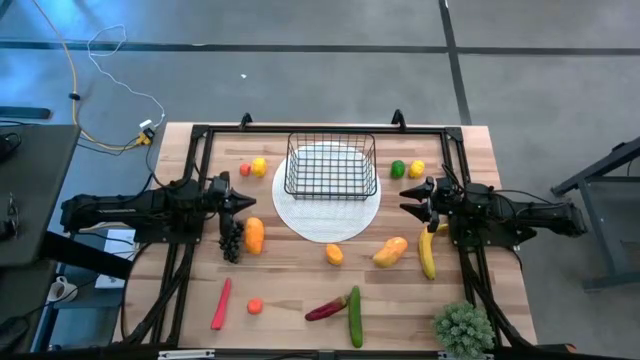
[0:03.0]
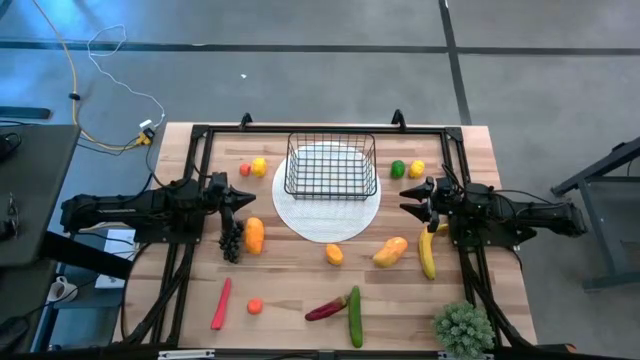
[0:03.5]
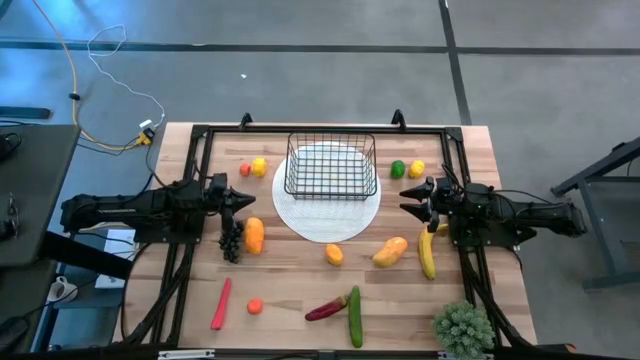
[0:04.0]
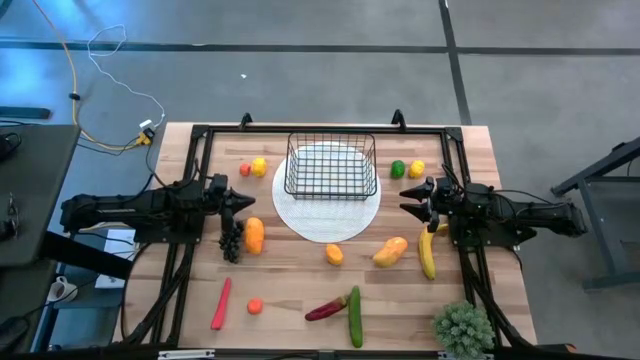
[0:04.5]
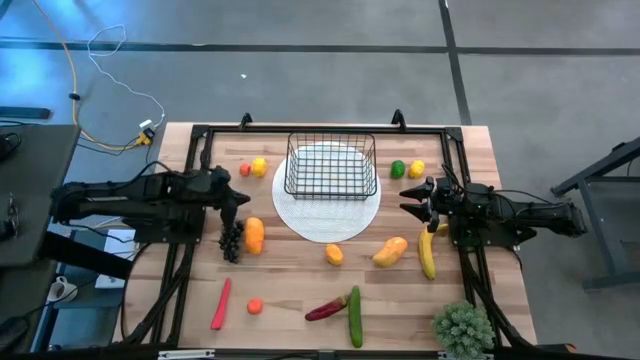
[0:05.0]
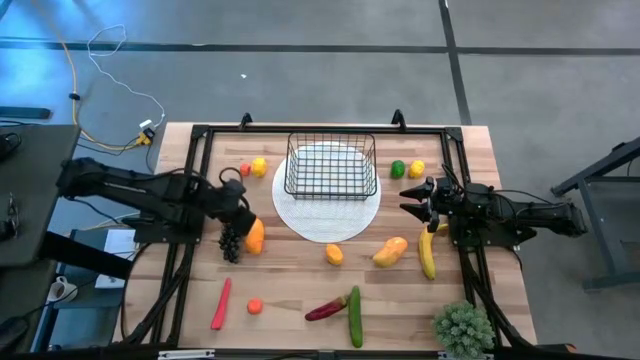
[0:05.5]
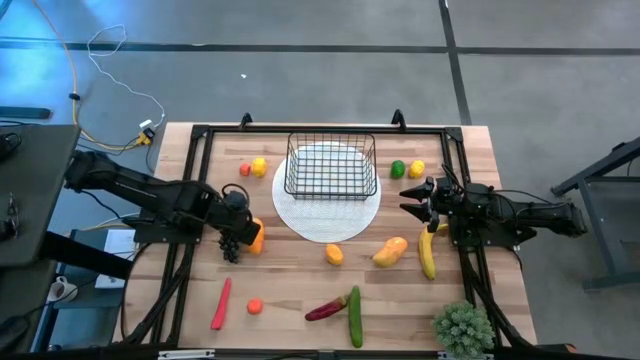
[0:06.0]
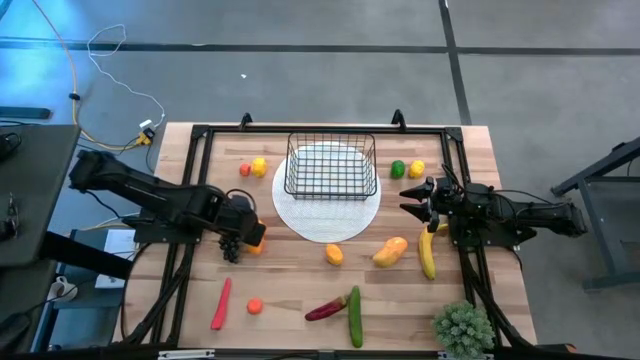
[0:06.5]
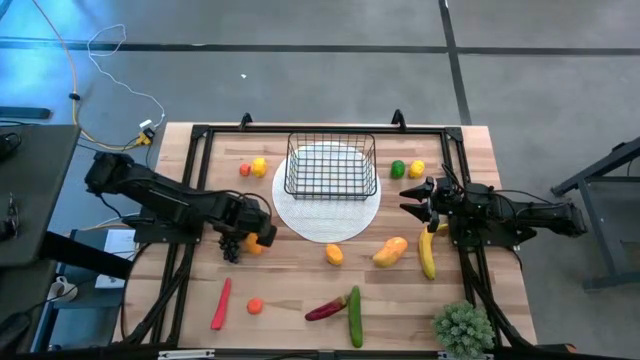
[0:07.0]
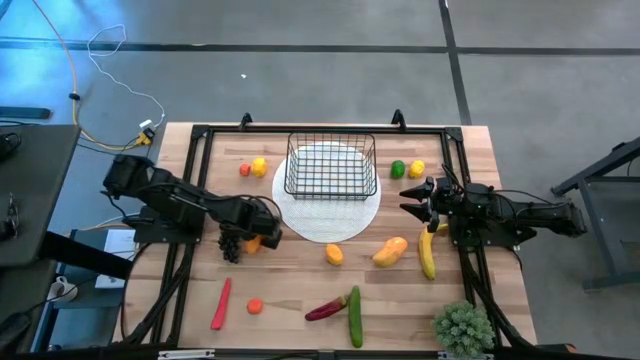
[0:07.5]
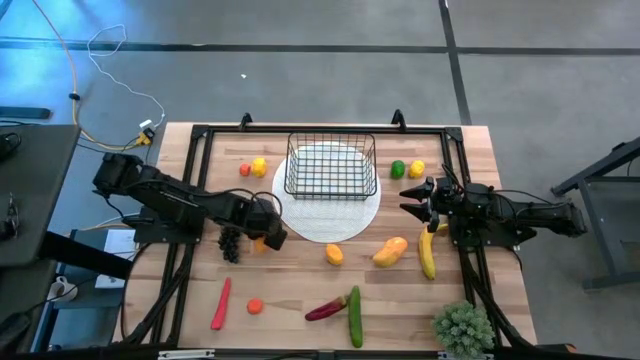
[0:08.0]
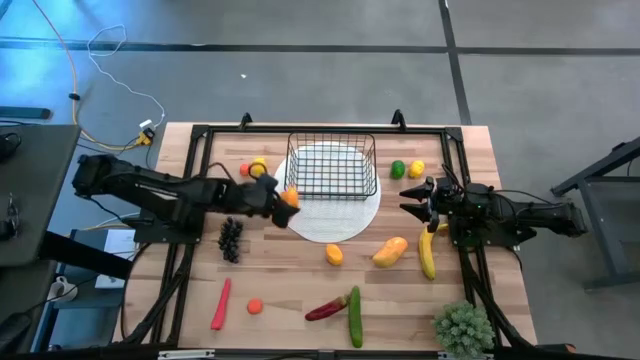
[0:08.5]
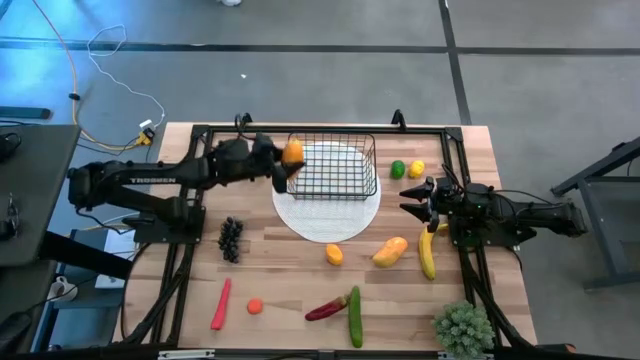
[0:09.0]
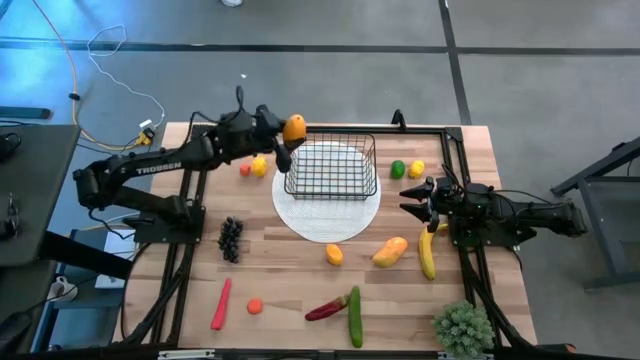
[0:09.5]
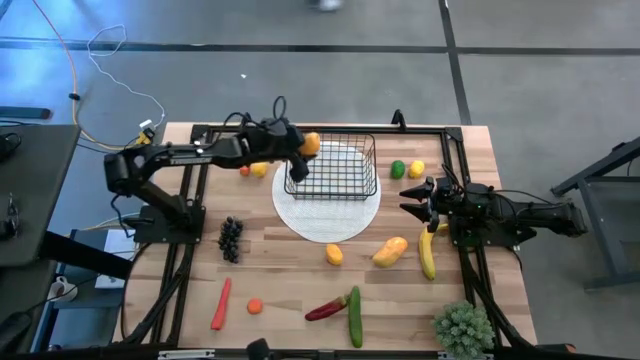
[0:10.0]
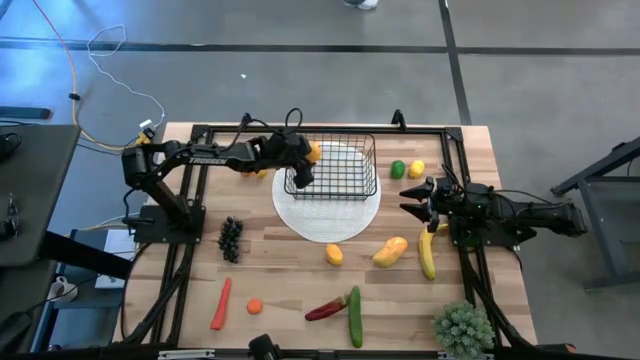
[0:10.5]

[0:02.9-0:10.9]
Task: Build produce basket
Put the left yellow mango into the black wire basket

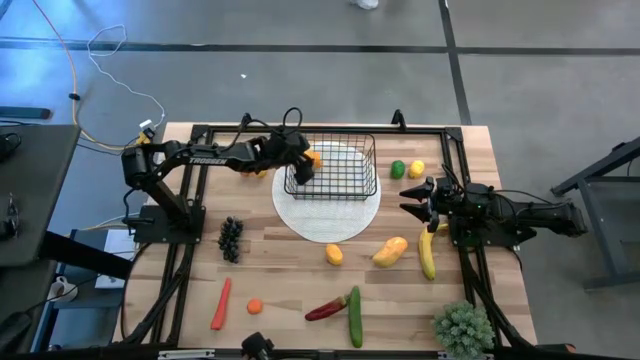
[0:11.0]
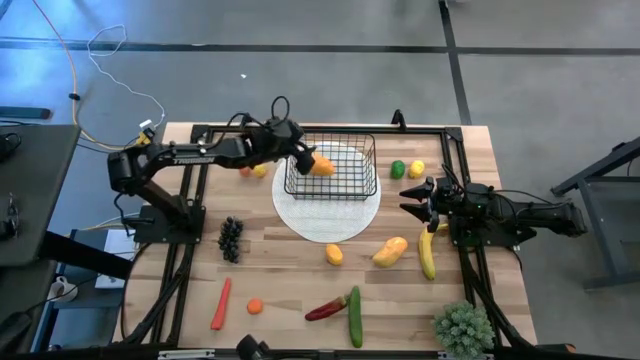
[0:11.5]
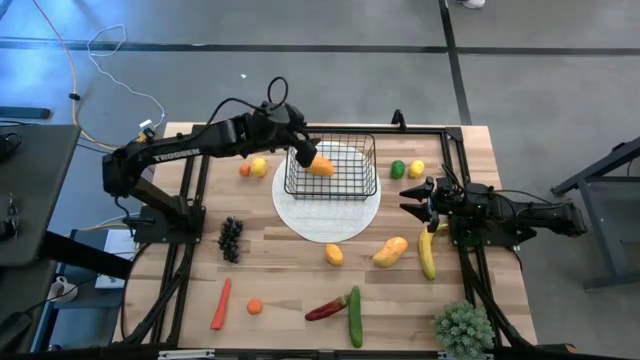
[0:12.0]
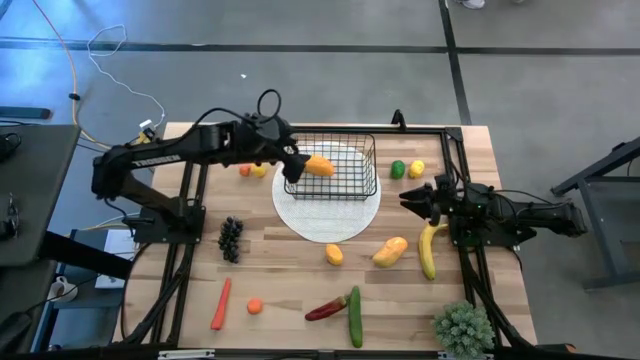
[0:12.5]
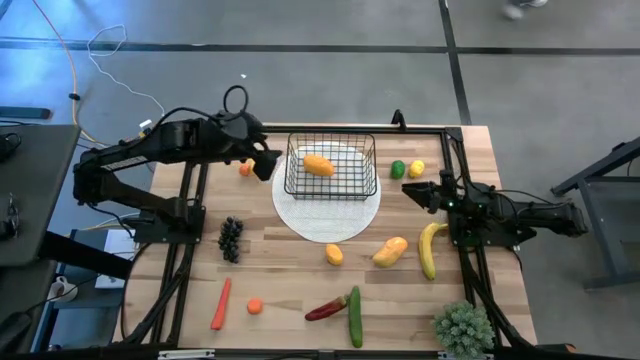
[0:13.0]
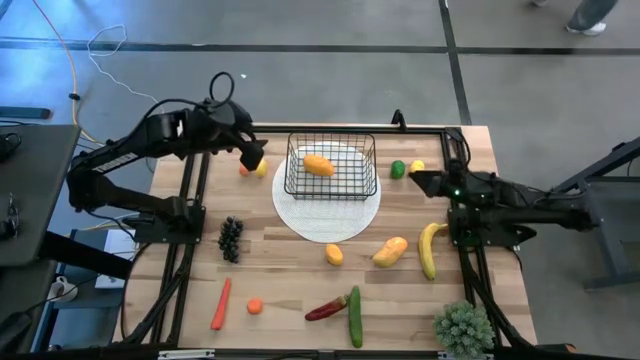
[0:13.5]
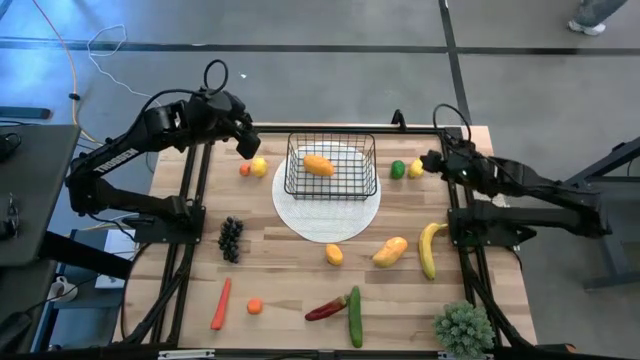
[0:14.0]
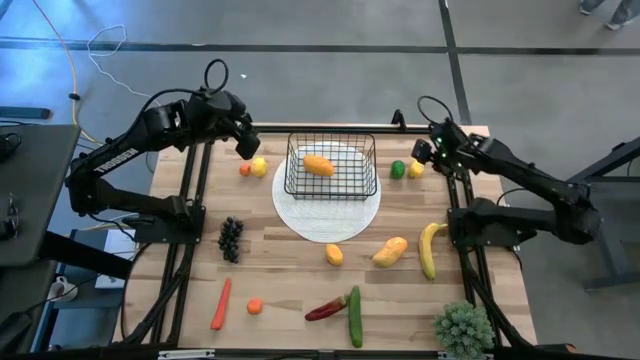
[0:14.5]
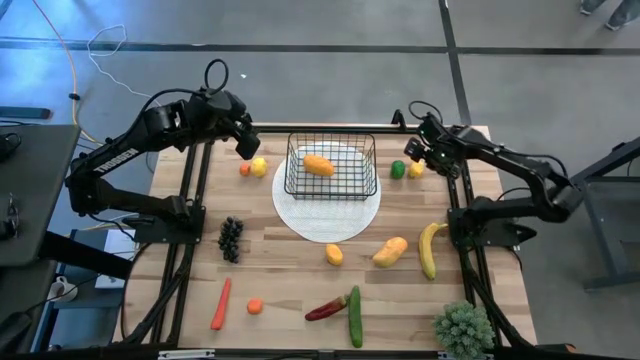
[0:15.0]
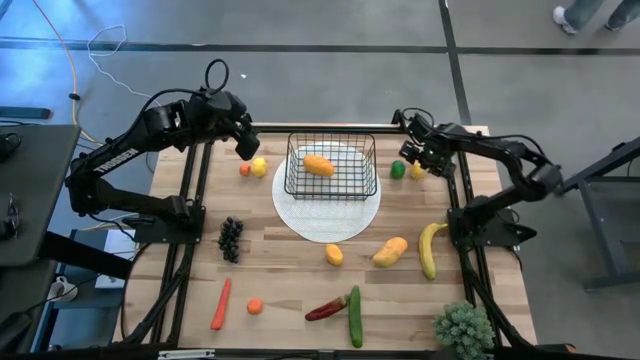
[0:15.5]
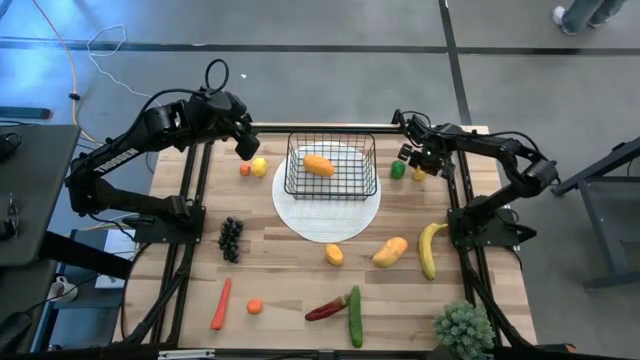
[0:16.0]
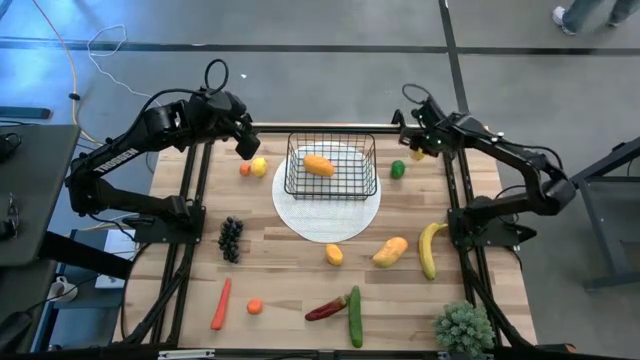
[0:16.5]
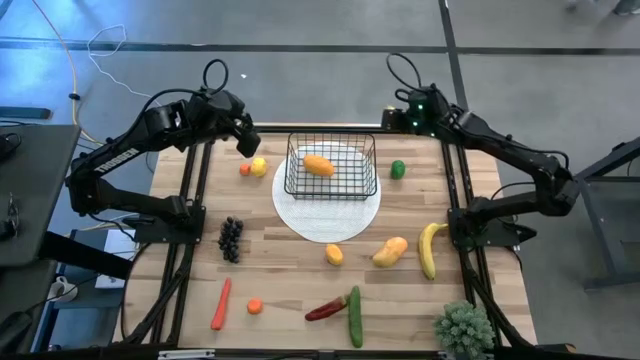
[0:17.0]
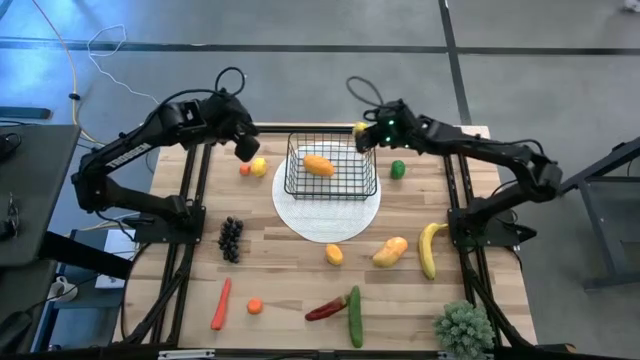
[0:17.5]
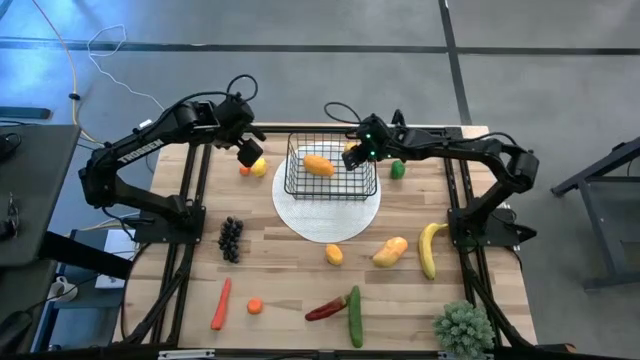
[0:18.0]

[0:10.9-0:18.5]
Put the top right yellow lemon into the black wire basket

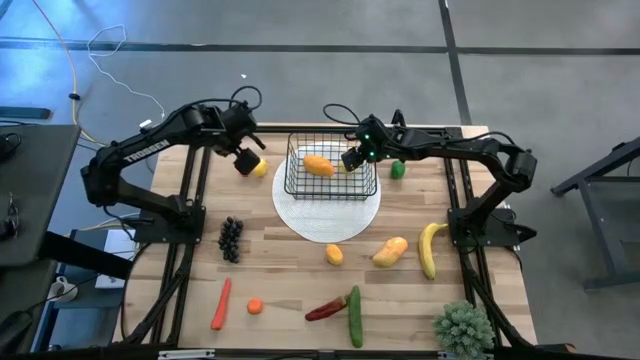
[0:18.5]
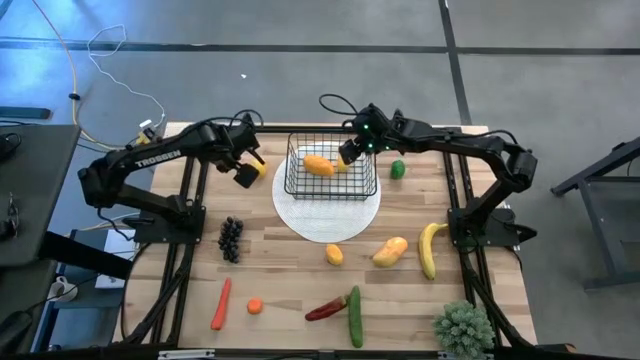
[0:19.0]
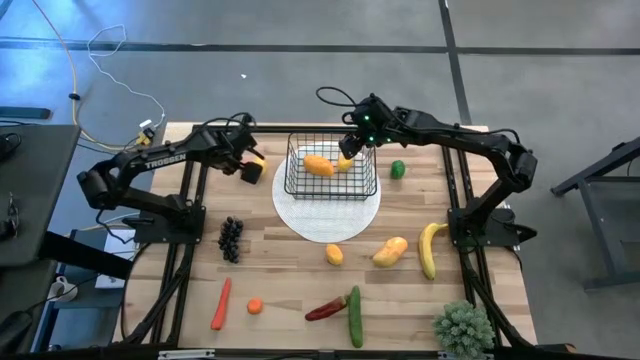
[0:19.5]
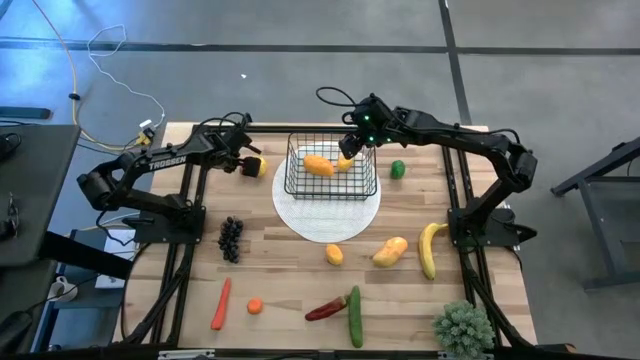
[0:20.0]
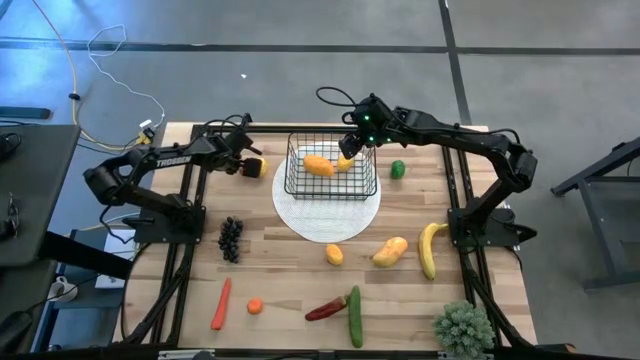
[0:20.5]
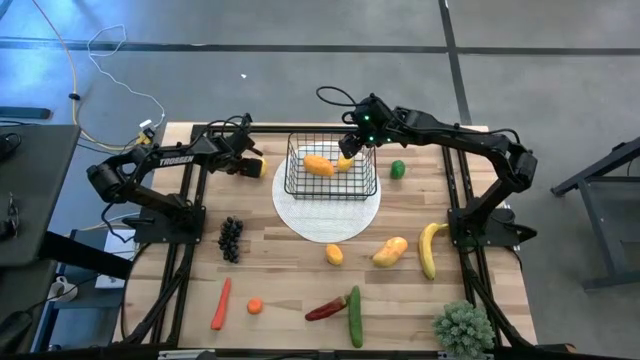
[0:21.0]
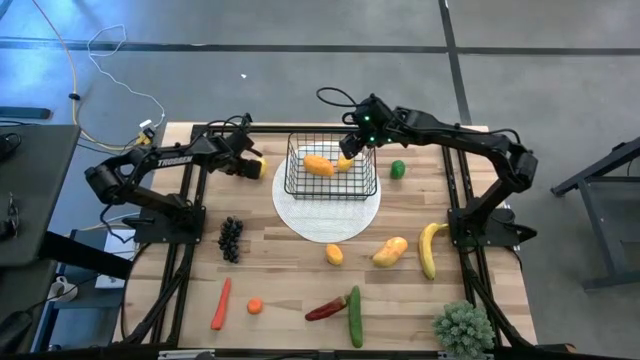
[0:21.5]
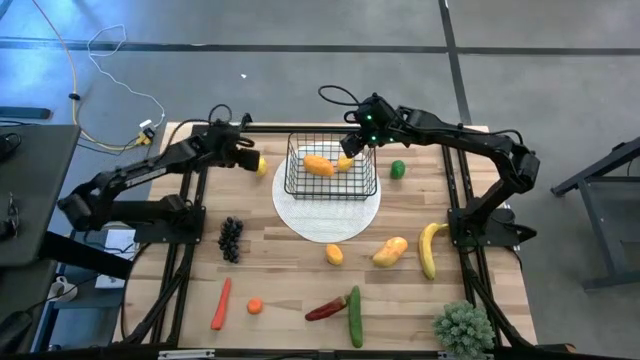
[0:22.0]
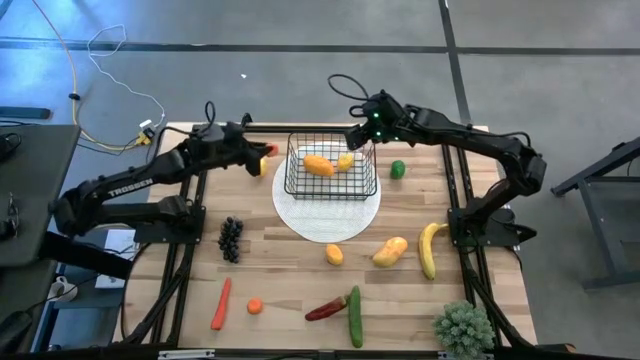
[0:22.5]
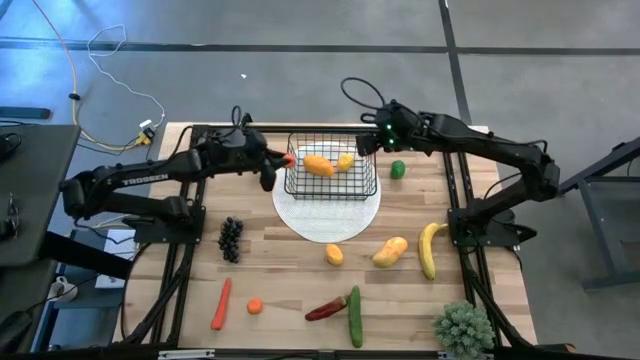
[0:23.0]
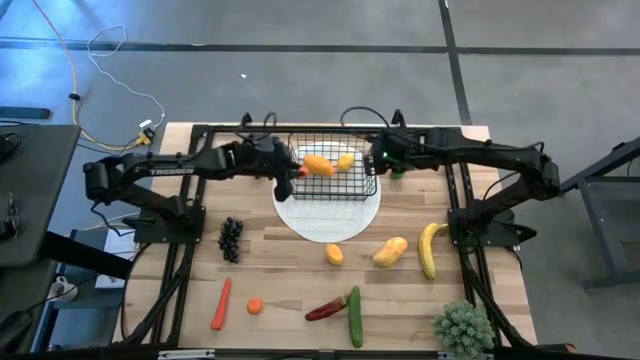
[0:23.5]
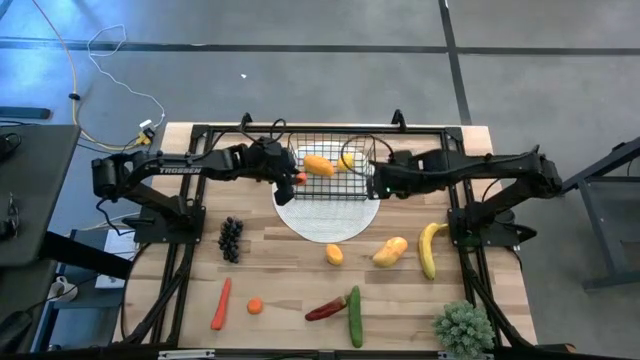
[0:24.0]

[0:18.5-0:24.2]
Put the top orange into the black wire basket
